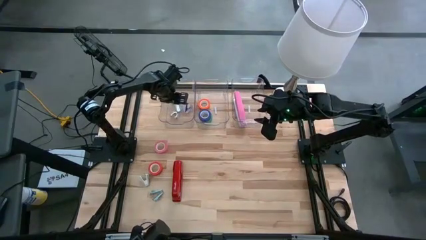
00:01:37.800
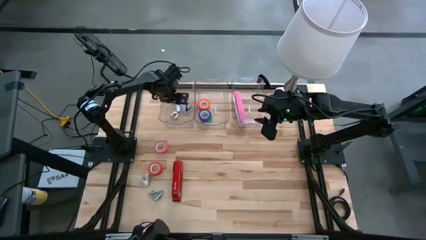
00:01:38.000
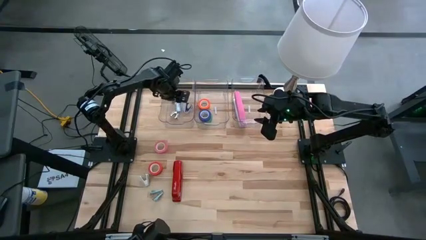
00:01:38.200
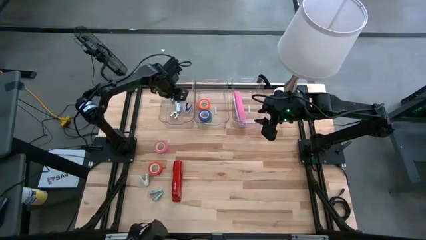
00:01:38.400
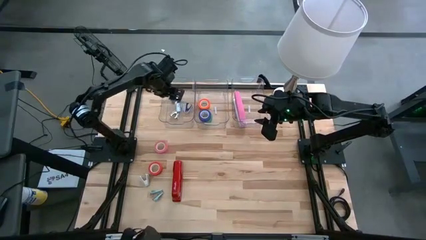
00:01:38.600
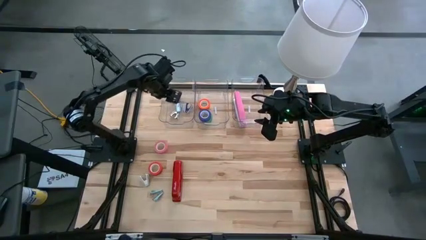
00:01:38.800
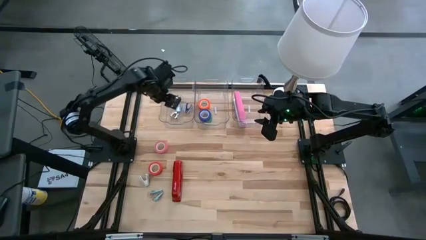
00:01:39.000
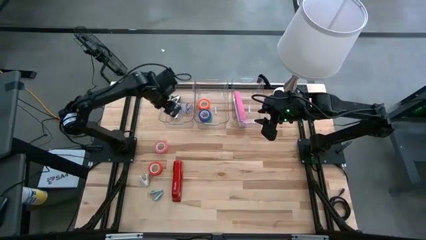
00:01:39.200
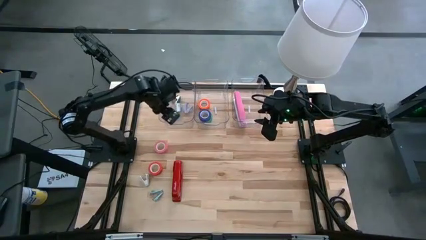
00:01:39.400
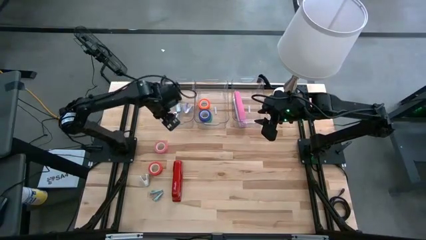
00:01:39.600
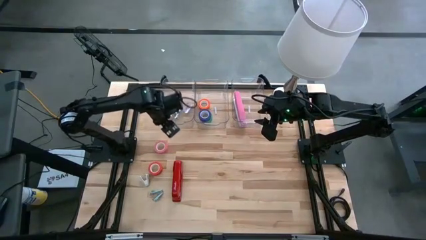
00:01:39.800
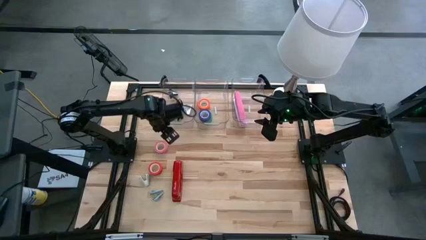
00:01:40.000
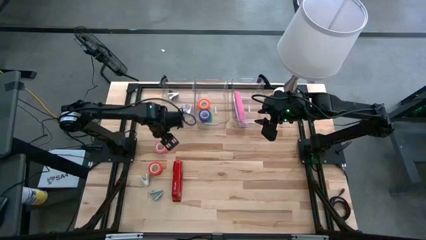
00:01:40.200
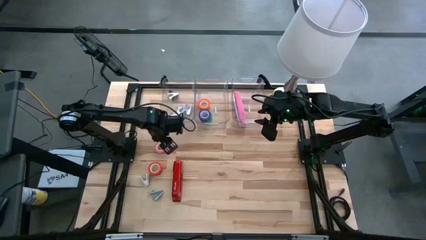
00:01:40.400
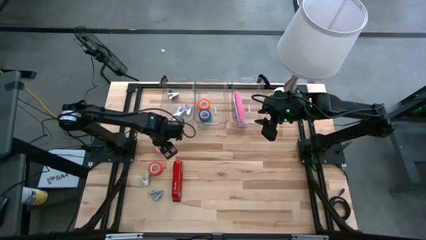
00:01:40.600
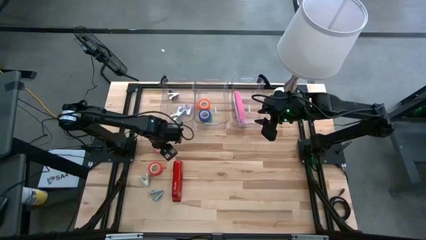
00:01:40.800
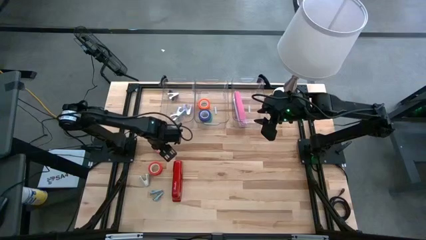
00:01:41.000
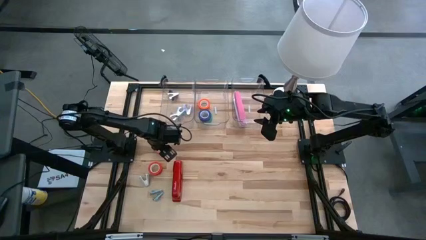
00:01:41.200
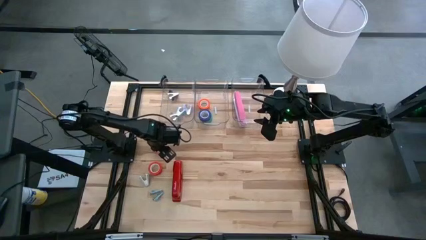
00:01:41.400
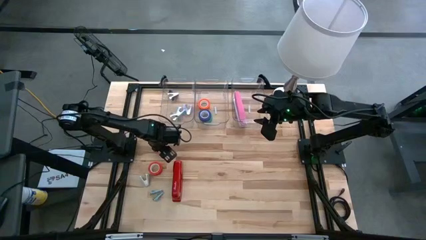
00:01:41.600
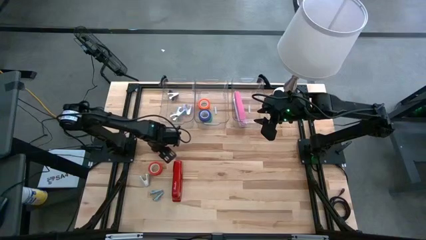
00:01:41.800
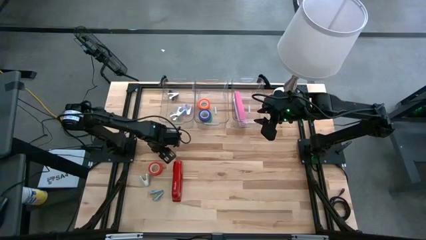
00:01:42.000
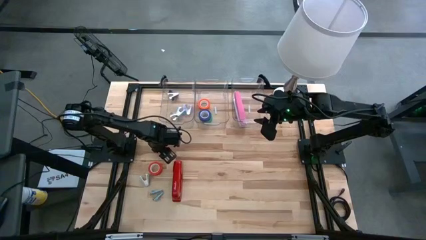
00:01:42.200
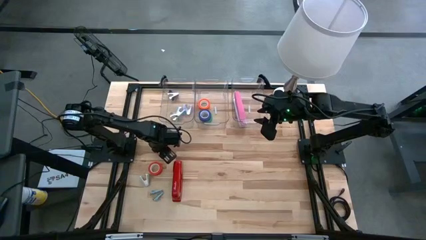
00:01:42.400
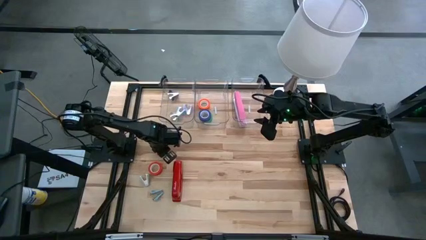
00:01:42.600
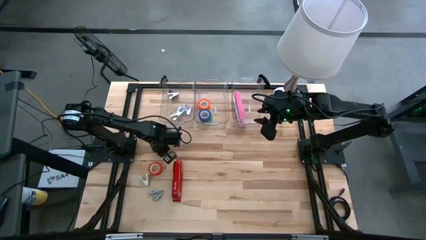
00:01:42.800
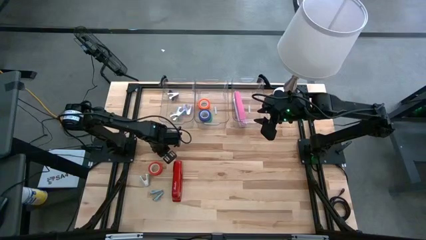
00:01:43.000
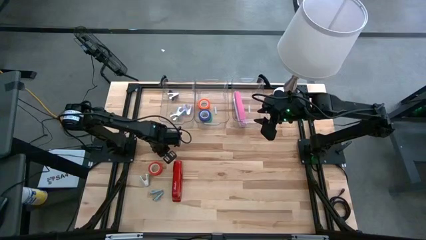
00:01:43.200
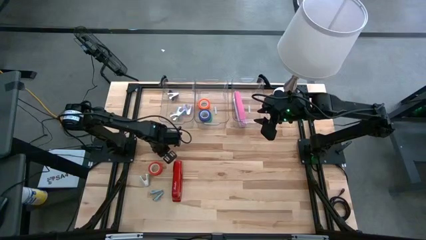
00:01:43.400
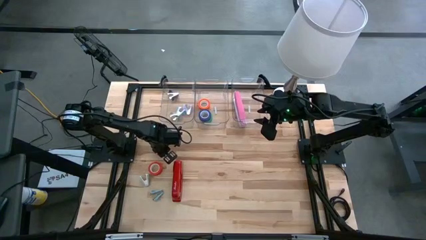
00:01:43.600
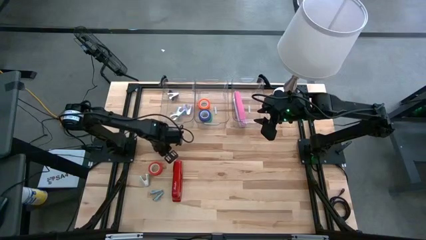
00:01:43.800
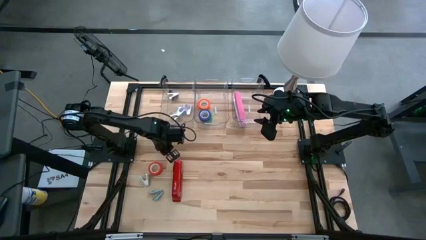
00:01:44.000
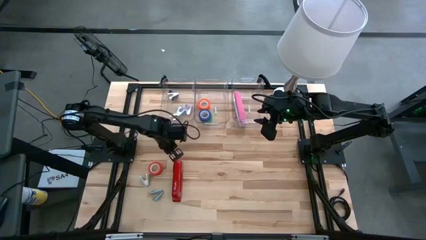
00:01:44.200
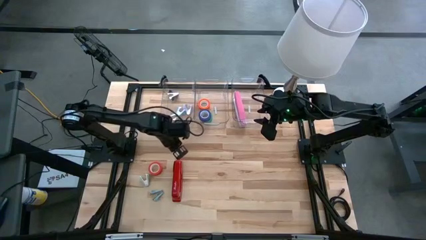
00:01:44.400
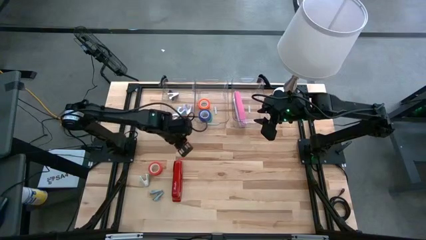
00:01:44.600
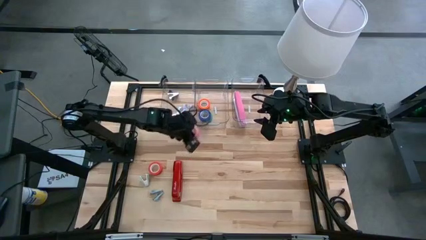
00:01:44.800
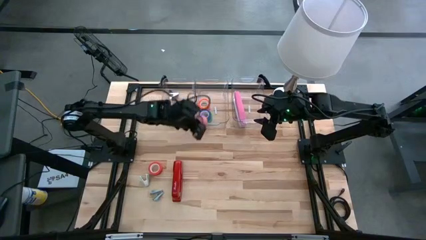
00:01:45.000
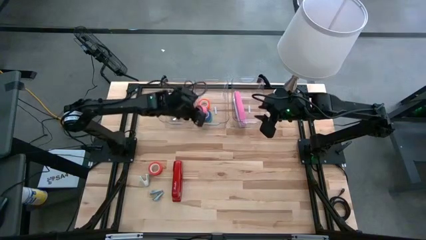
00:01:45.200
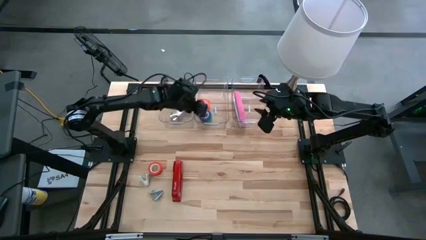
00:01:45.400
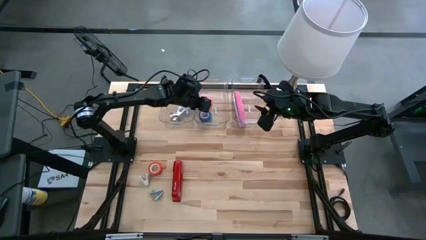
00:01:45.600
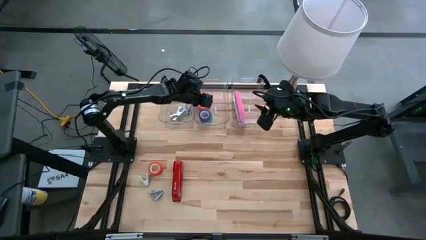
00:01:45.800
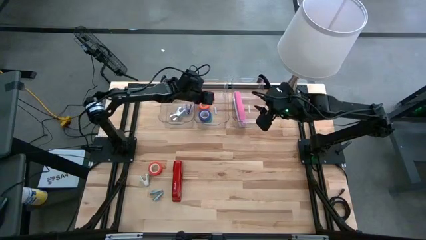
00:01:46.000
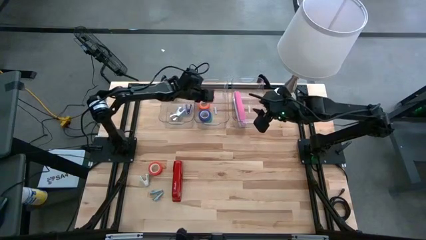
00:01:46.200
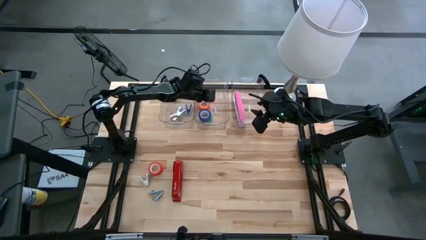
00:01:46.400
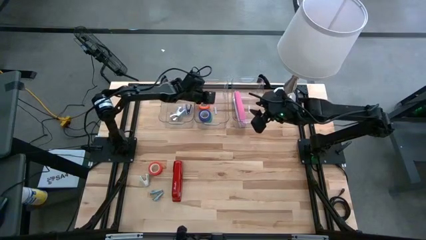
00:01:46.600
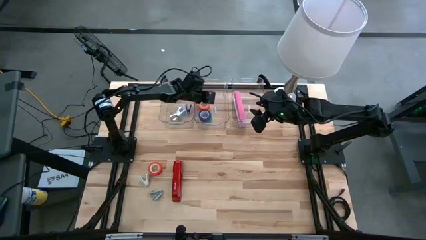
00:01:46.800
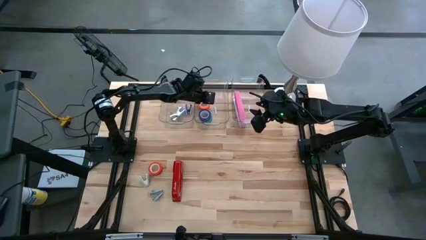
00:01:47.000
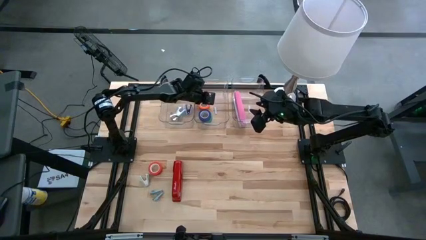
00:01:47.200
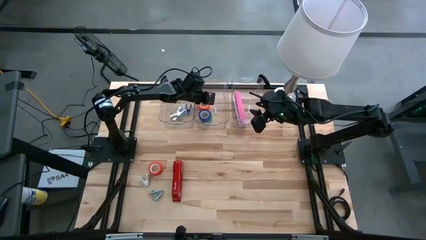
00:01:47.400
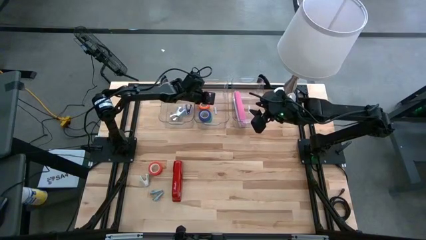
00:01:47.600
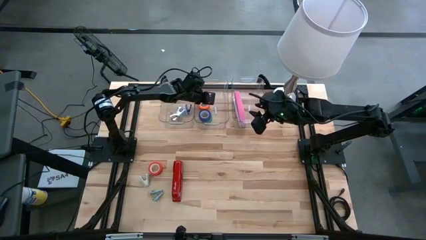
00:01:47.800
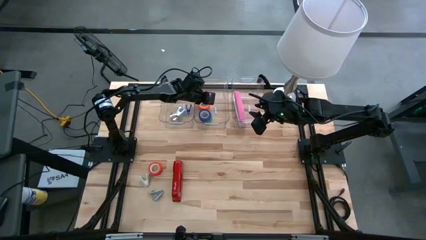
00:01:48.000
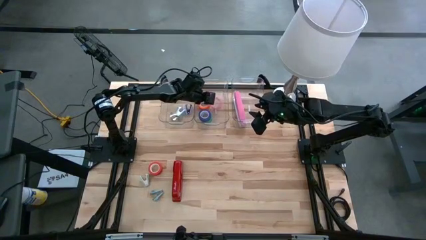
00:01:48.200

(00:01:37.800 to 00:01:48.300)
Task: Pick and place Stapler, Stapler remover, tape
Put the pink tape into the middle transparent bin

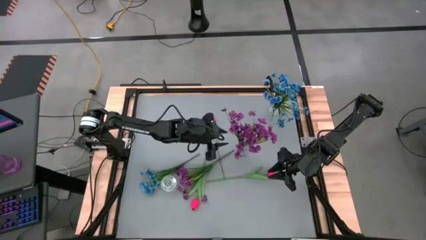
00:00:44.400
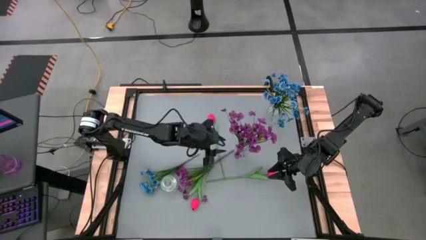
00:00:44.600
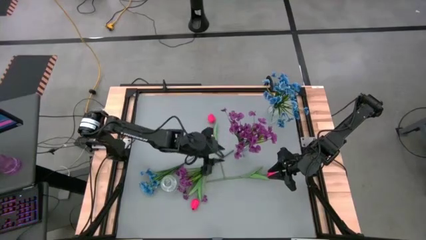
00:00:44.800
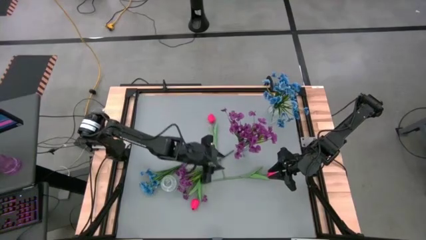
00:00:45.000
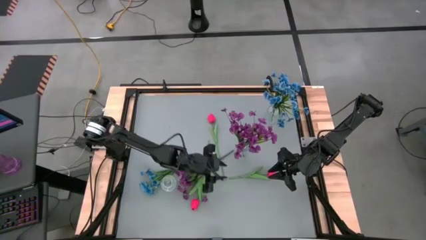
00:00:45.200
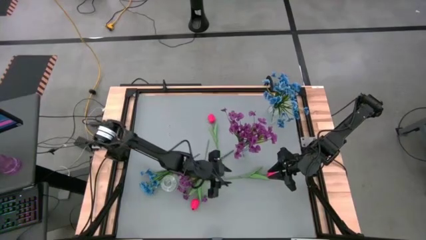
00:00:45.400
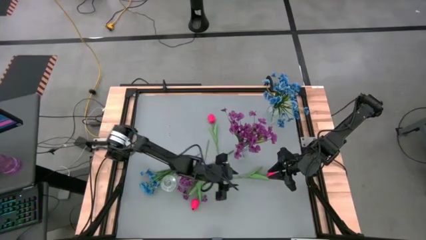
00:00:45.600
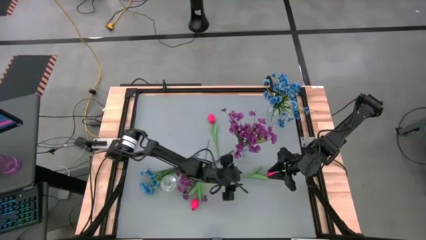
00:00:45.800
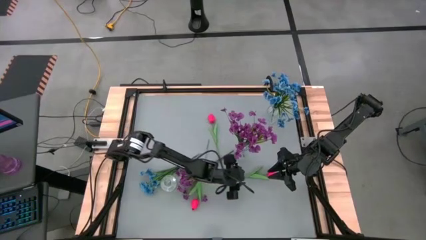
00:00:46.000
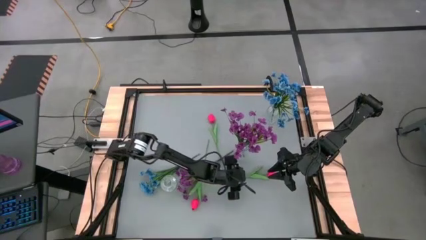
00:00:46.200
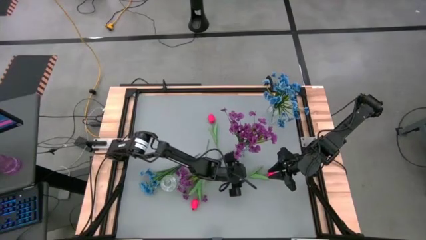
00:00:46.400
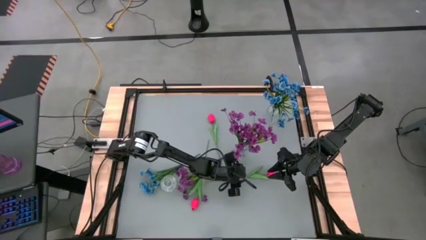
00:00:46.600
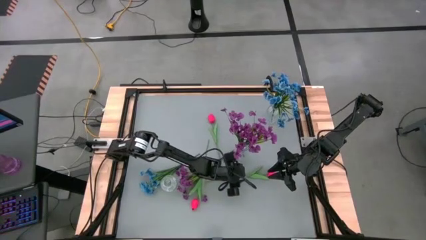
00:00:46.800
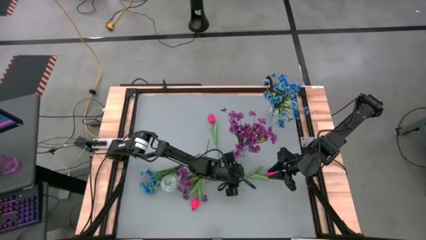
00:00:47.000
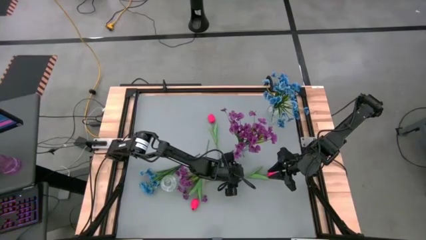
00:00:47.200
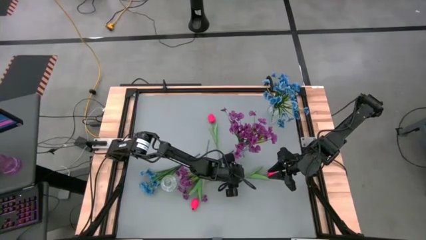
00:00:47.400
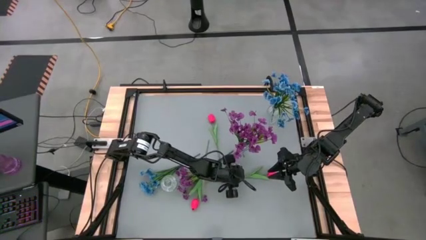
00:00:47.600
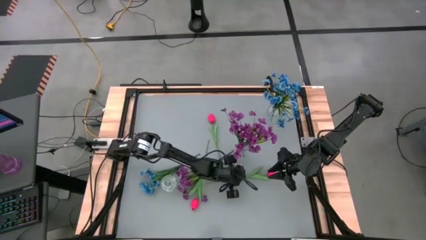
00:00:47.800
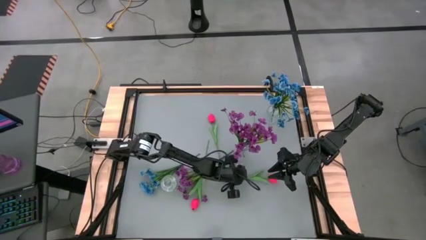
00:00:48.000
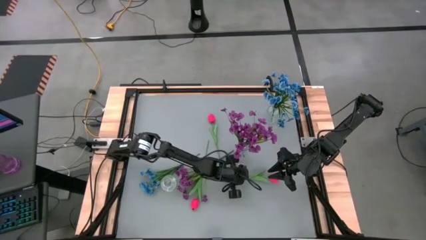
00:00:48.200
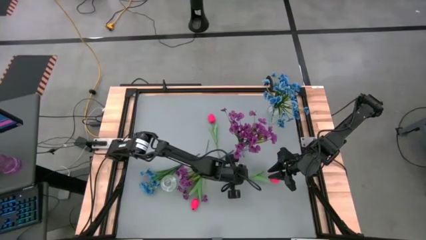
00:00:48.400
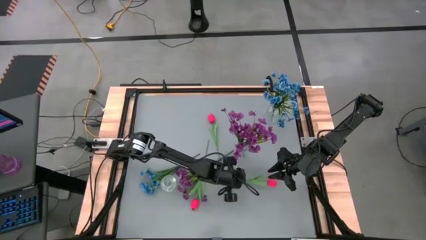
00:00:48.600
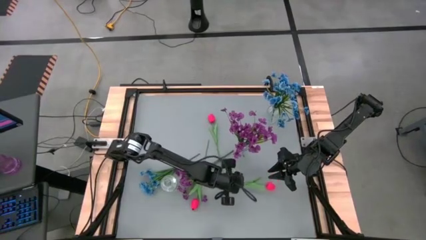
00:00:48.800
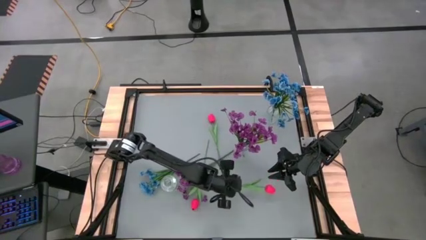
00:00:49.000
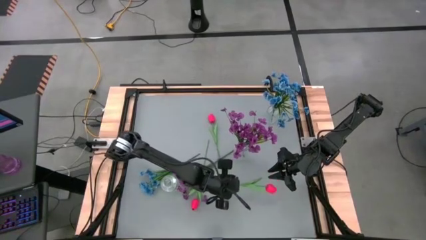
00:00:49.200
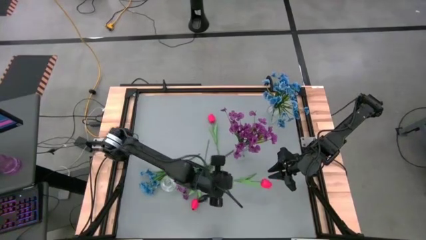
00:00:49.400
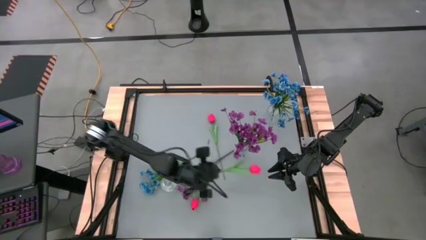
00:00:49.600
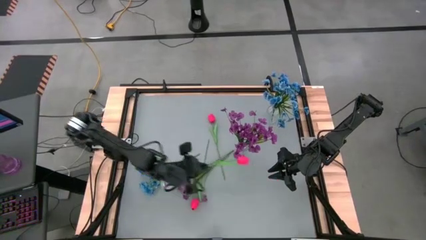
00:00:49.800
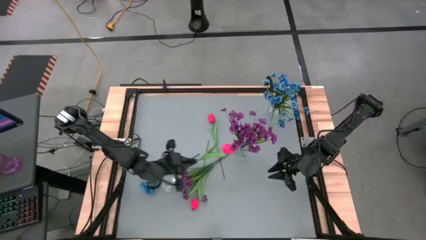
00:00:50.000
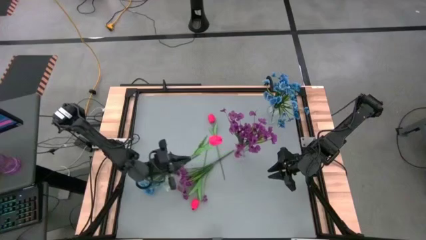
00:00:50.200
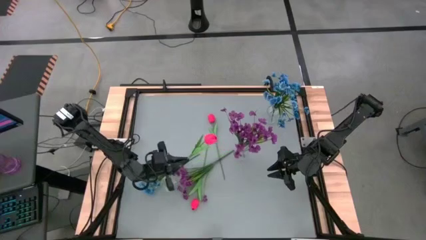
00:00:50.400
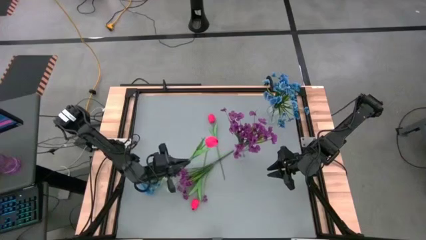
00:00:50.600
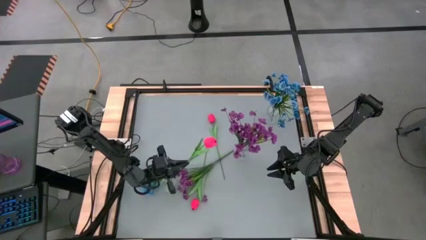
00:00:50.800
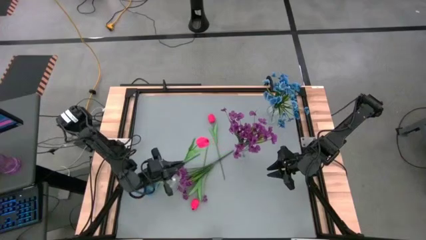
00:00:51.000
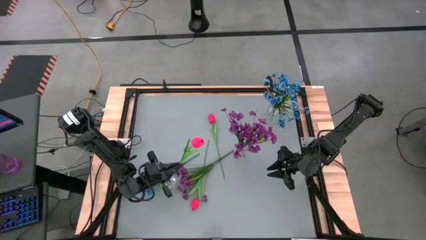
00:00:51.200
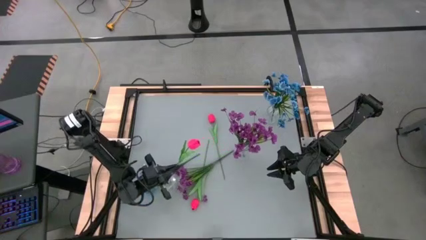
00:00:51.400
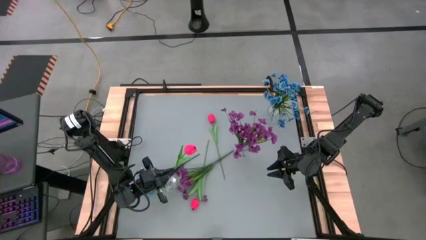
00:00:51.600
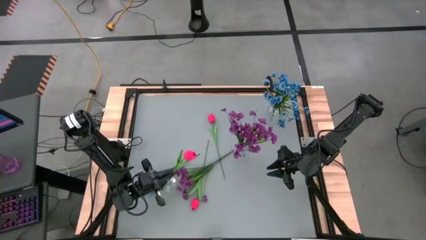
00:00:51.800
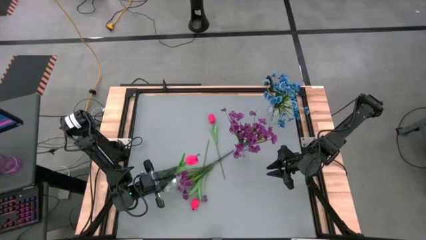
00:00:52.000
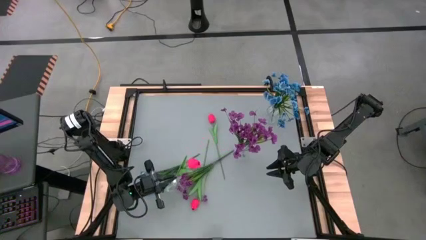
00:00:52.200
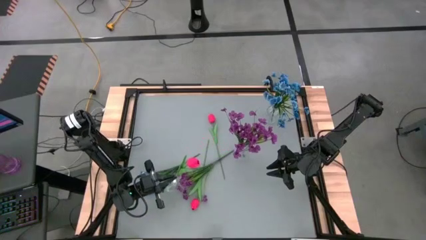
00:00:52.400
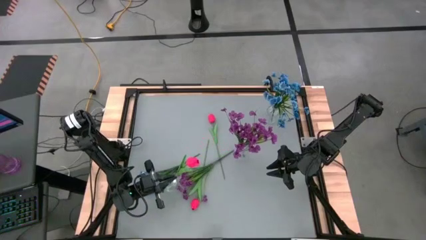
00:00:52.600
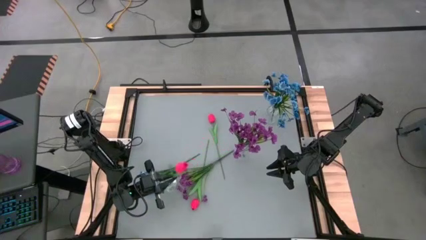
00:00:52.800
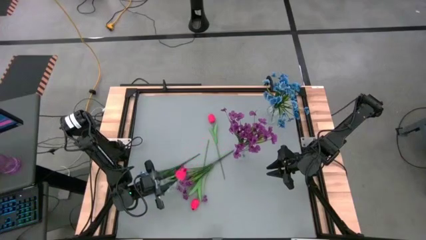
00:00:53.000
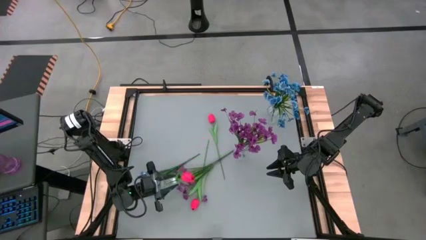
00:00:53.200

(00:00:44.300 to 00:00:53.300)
Task: Sort flowers into vase by color
Put the bottom right pink tulip into the bottom transparent vase
